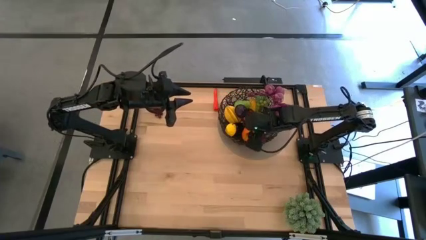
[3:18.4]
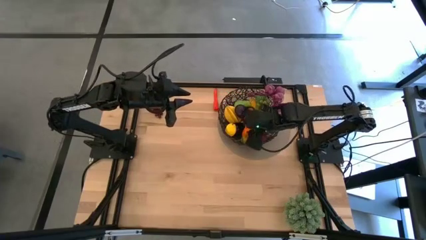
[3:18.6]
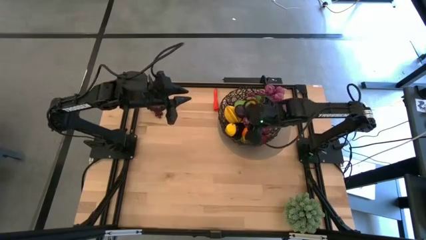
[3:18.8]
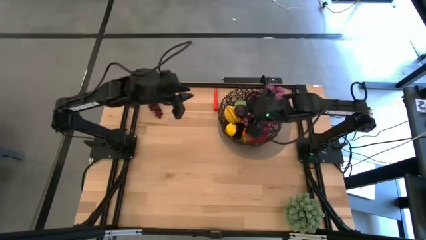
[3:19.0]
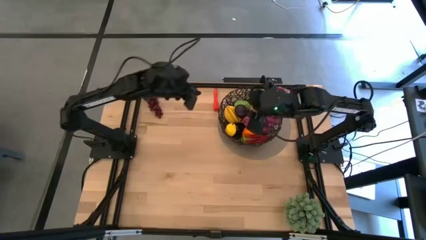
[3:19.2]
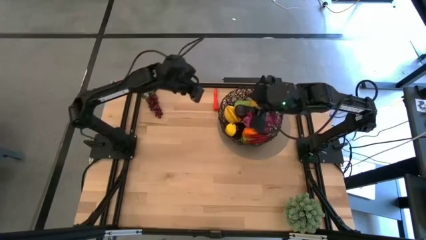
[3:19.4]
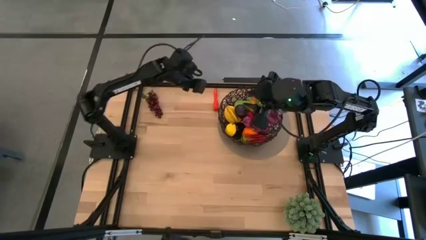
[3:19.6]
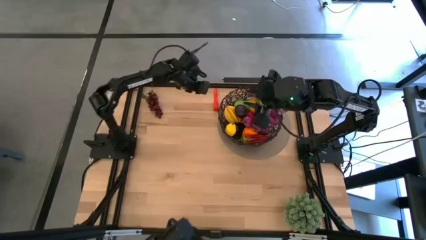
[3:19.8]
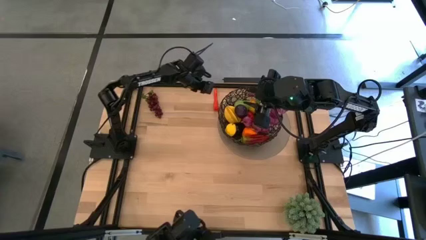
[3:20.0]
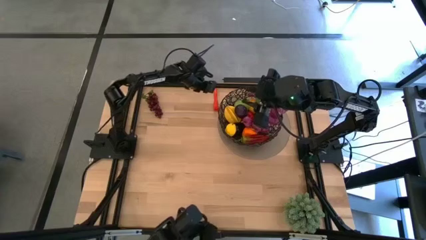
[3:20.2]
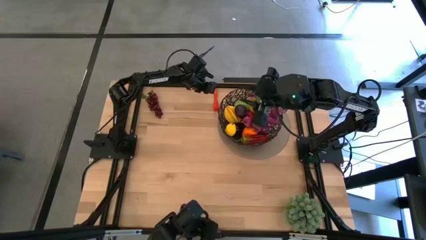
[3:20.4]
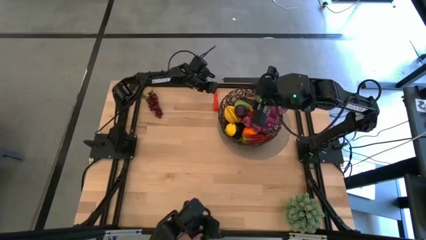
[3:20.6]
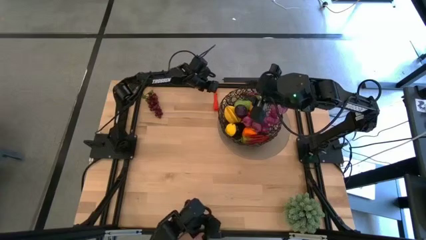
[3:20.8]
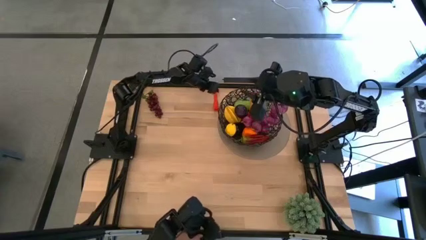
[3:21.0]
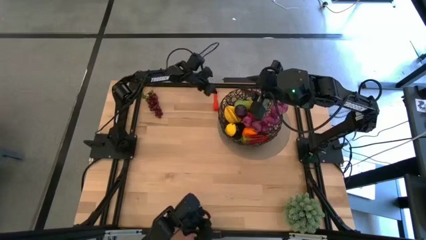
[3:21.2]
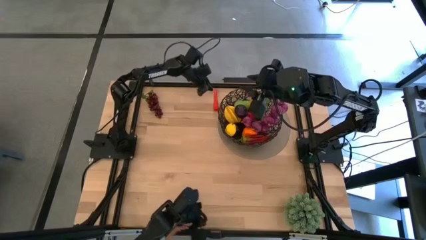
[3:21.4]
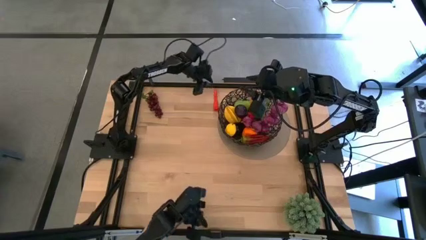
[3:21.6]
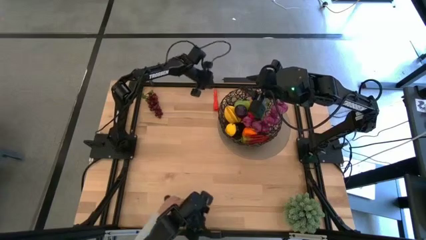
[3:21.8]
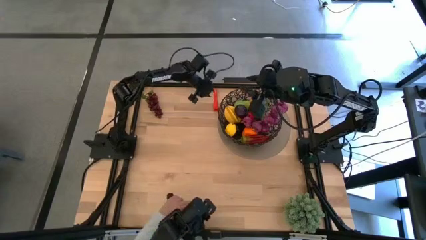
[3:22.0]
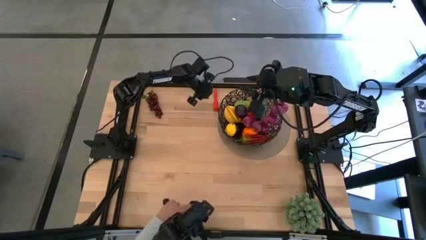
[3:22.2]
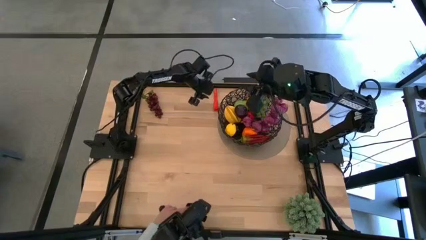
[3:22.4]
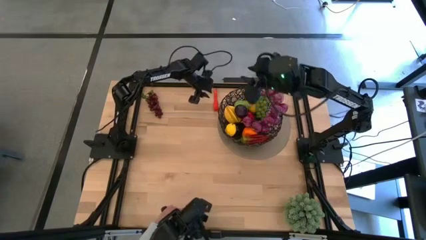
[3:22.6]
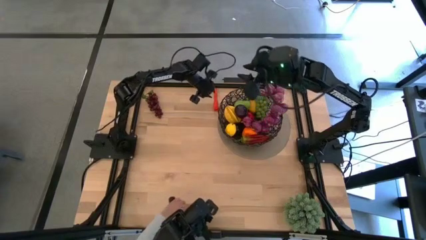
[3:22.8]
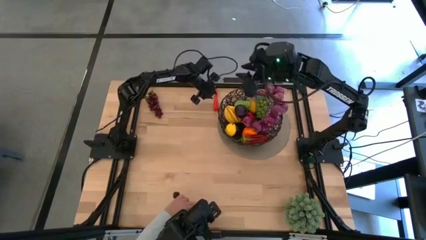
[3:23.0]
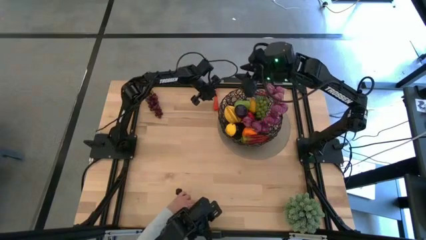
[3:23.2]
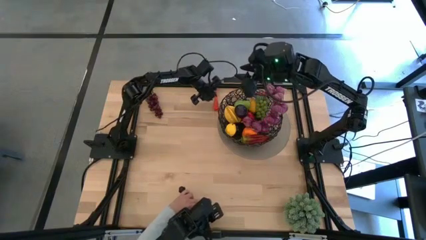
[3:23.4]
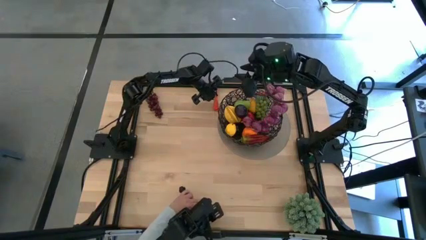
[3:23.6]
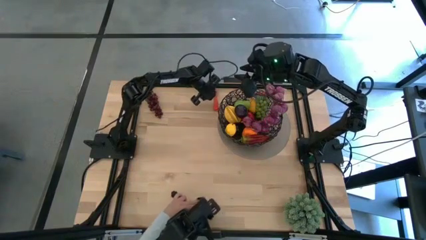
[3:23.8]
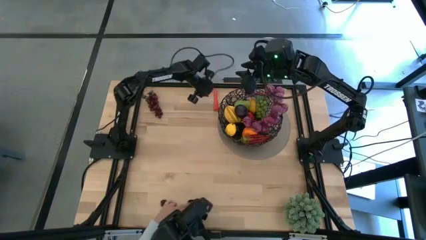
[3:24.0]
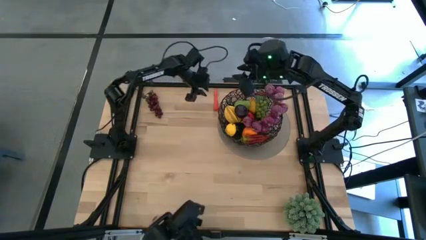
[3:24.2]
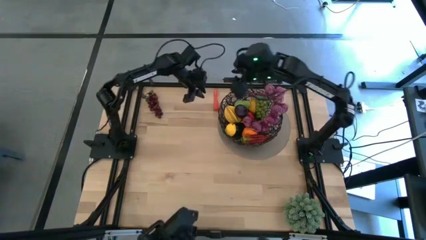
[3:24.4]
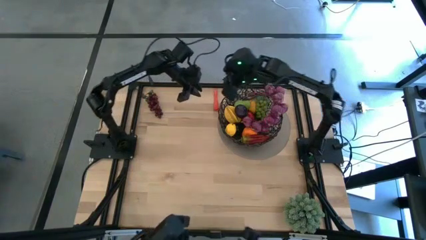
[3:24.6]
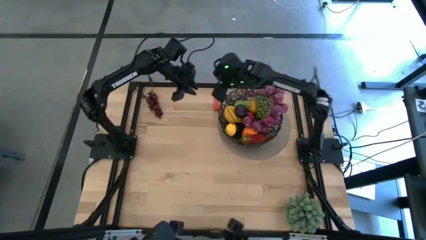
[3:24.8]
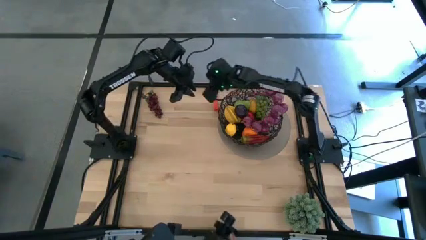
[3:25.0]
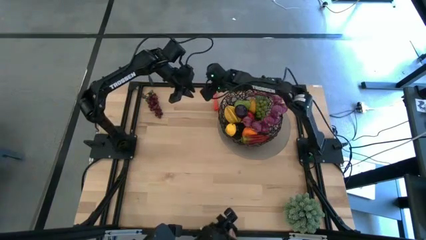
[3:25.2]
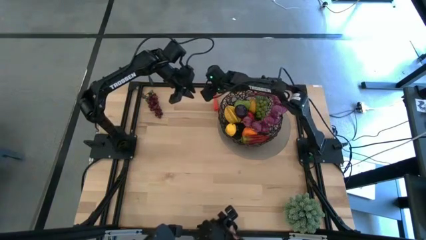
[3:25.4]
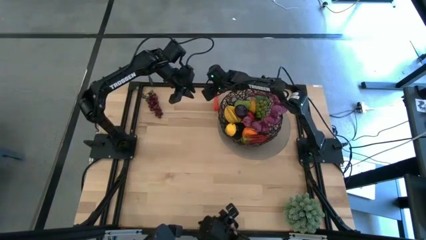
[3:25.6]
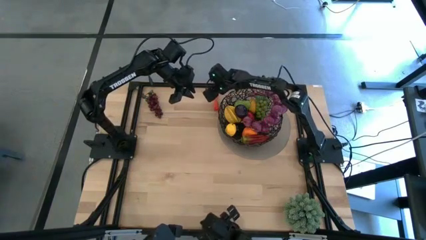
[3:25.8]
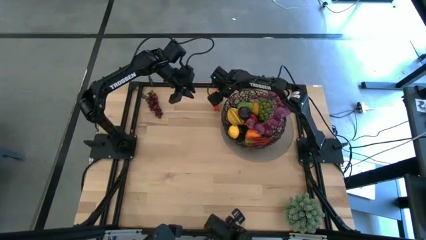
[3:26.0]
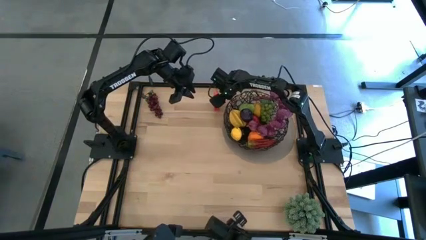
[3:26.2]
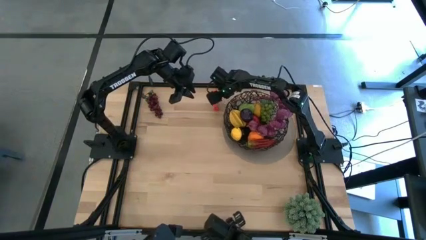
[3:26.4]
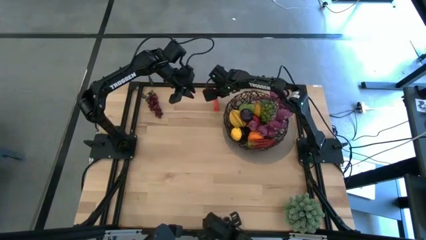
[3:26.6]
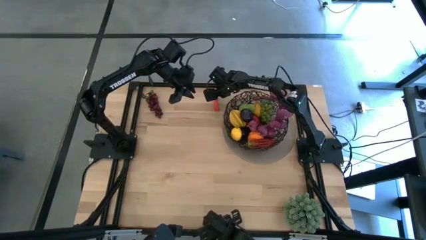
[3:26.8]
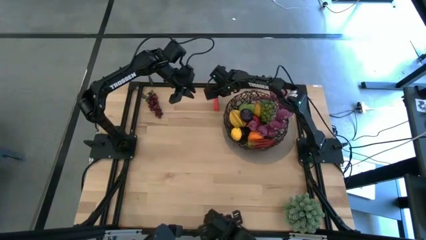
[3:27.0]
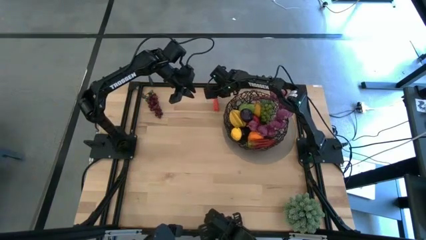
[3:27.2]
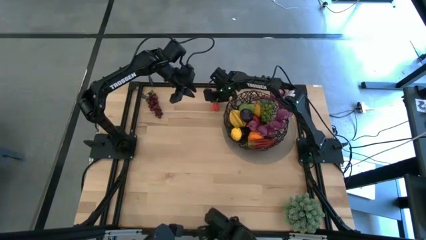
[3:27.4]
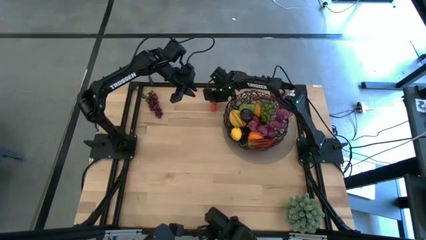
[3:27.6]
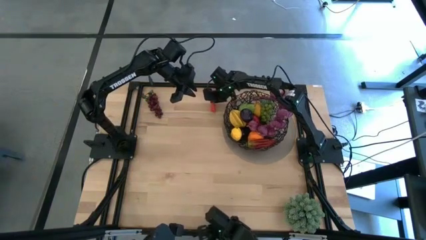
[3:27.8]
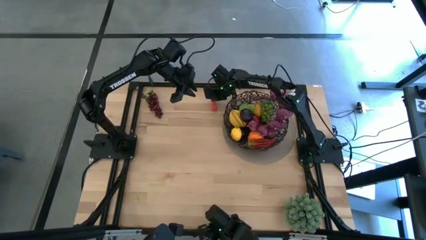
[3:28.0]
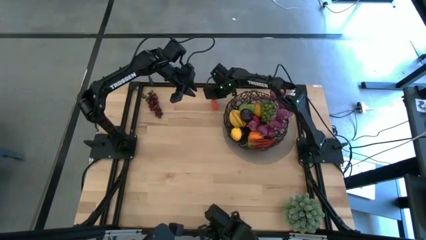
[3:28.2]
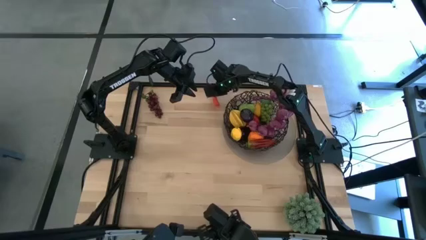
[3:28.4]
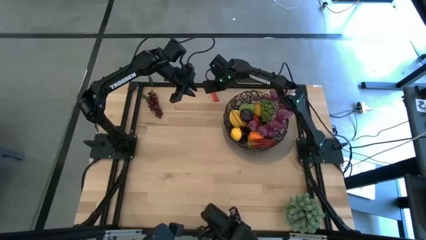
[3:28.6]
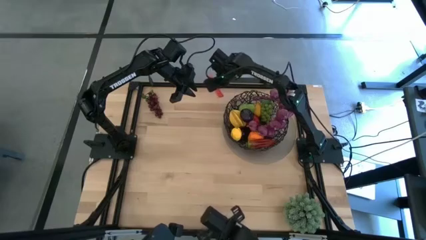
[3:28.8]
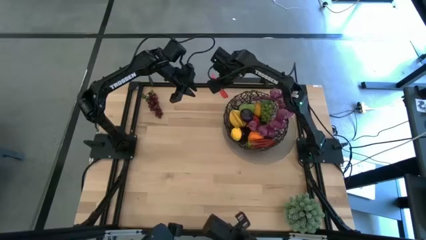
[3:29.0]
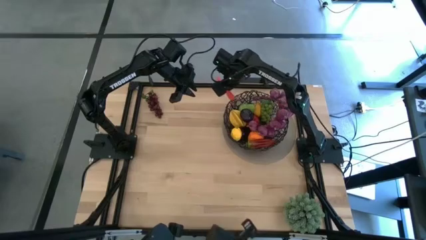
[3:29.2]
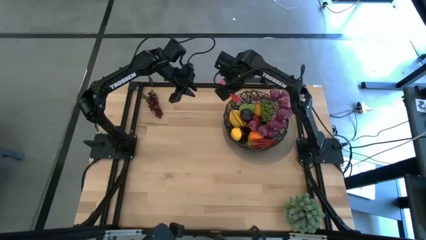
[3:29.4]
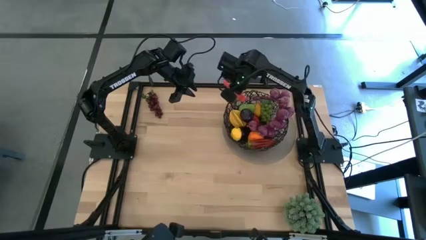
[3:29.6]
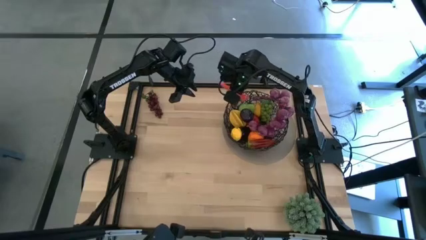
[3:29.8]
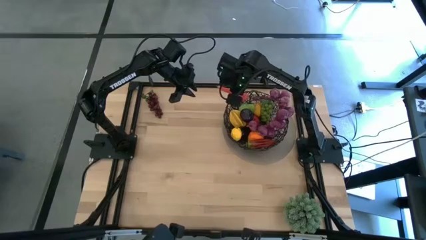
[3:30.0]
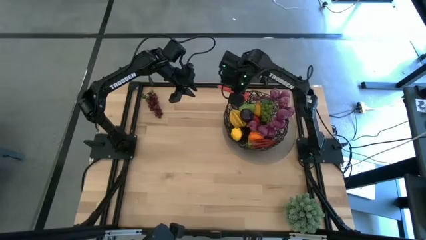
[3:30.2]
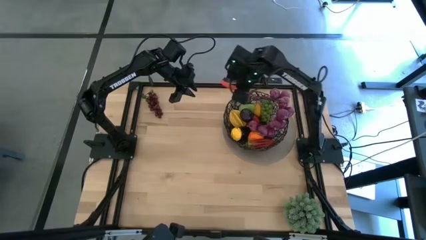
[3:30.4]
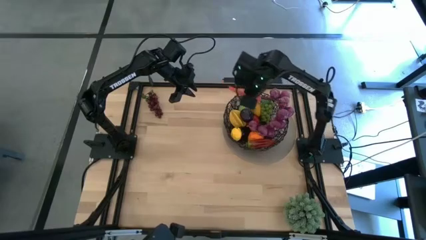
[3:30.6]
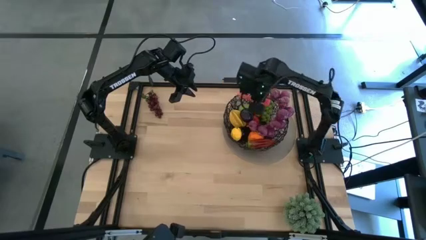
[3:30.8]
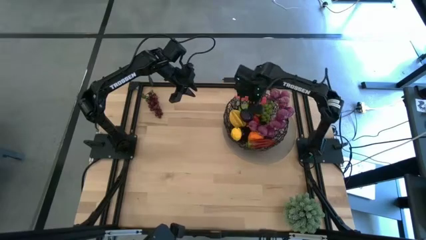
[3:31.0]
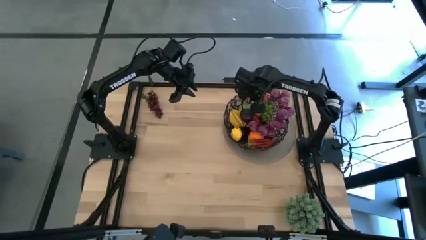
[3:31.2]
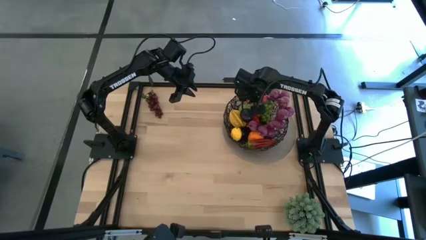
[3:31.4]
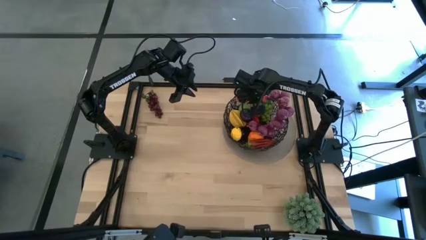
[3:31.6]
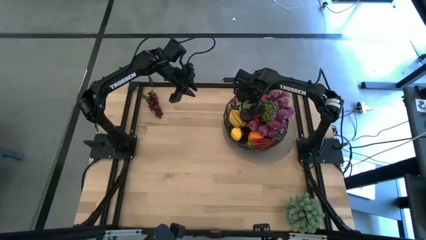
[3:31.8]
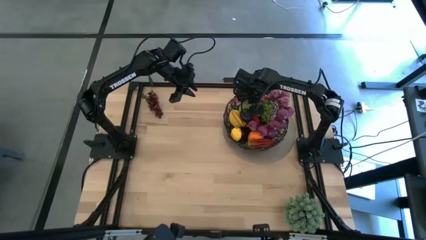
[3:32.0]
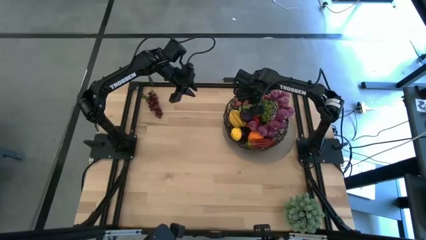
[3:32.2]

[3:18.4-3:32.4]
Task: Build produce basket
Put the carrot into the black wire basket

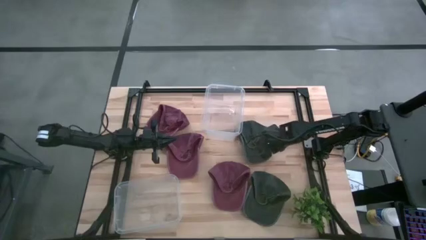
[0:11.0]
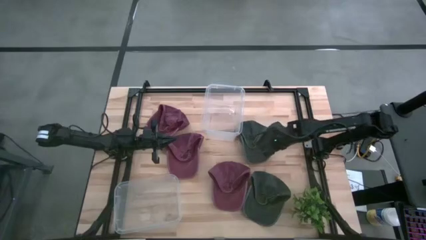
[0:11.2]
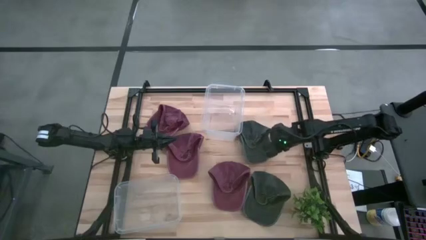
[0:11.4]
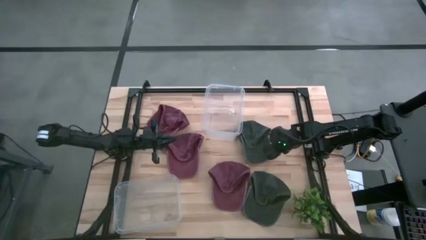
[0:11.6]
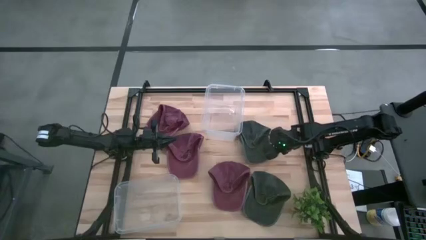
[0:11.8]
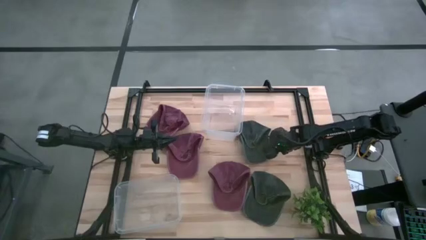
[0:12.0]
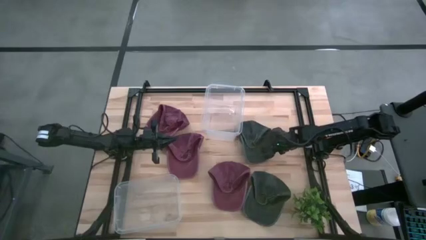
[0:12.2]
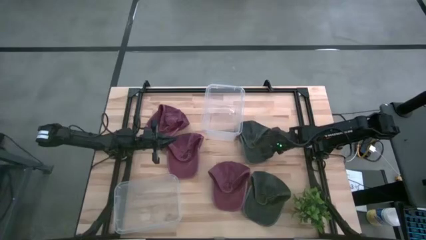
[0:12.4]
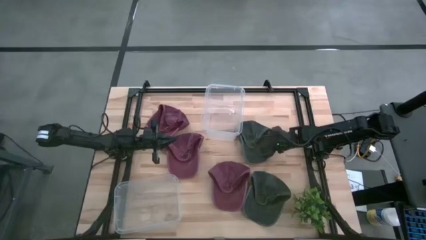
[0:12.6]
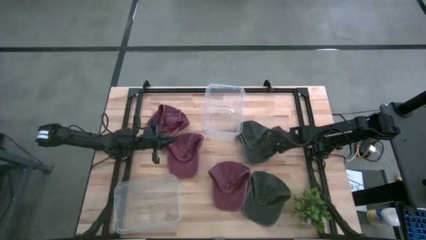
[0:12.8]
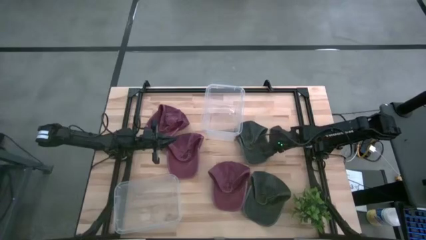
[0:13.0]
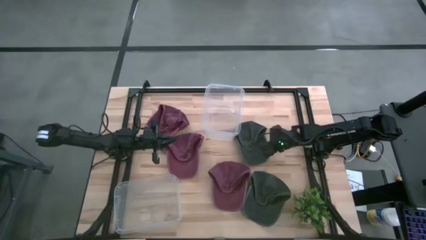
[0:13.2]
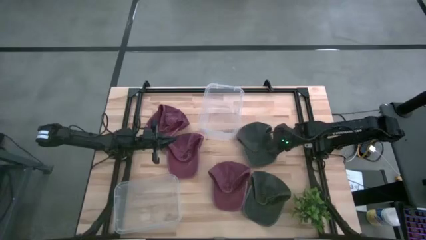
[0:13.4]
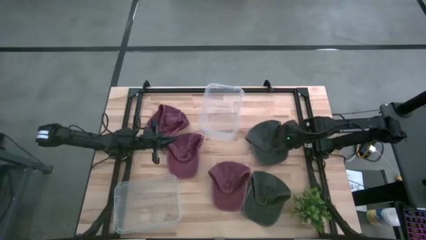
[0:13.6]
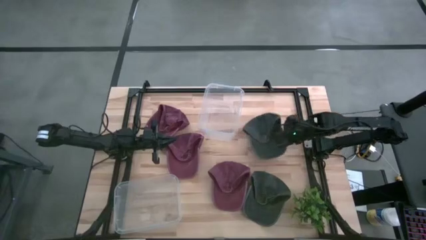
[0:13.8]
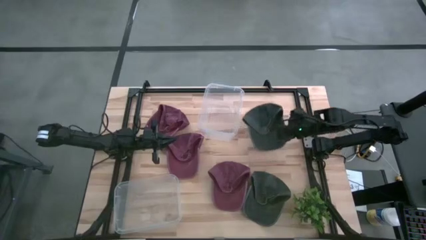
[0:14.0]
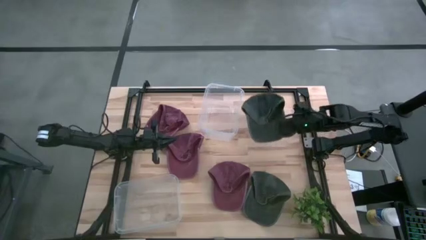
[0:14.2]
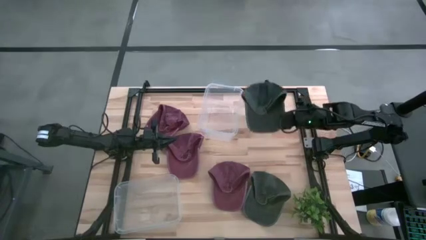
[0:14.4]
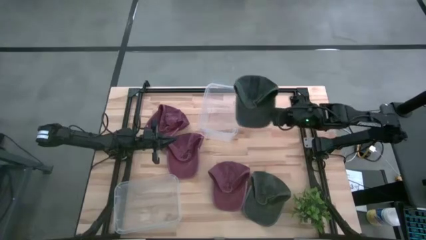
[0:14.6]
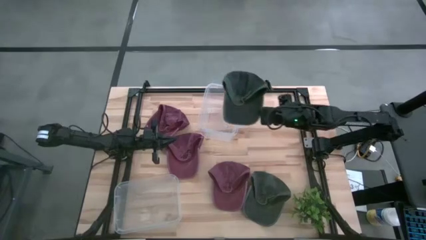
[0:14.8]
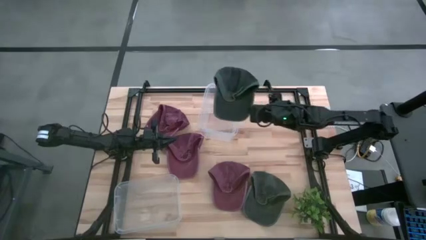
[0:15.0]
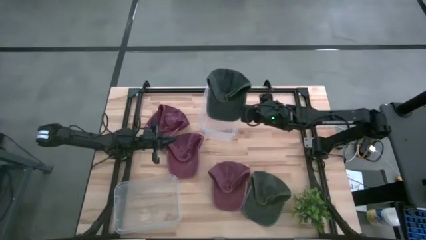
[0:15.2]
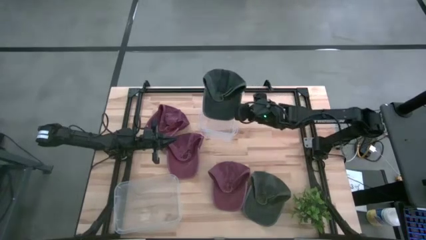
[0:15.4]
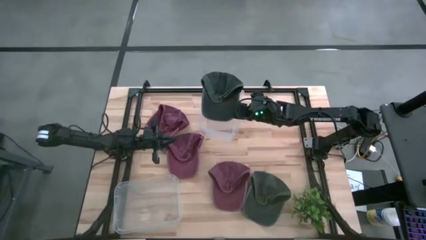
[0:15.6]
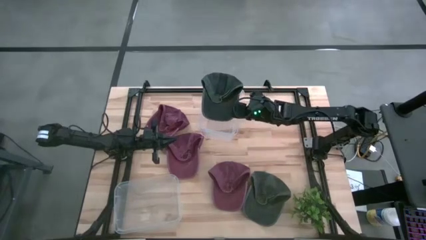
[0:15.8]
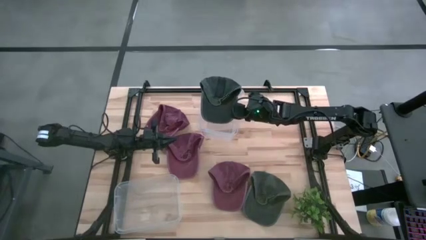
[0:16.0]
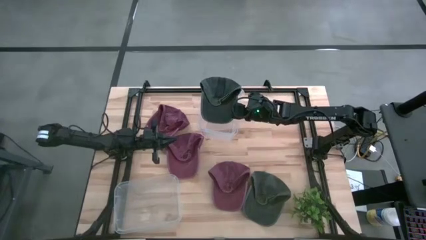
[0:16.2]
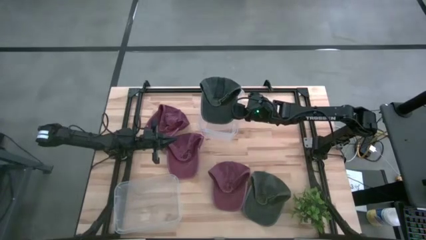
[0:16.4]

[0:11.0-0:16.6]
Task: Pick and place caps into container
Put the top green cap into the top transparent container
